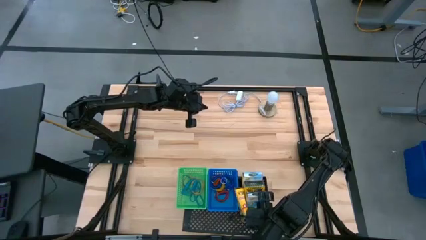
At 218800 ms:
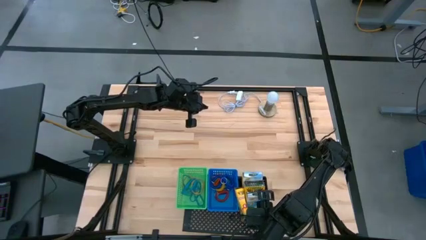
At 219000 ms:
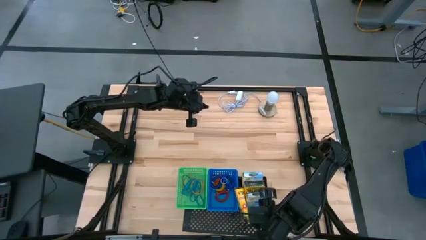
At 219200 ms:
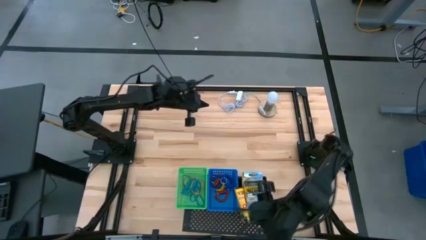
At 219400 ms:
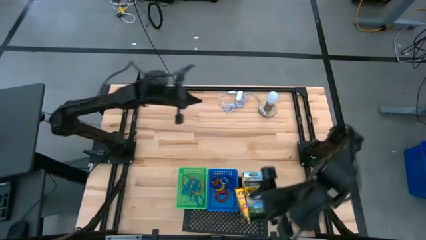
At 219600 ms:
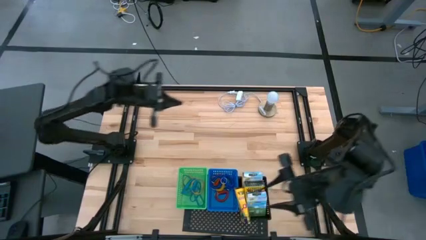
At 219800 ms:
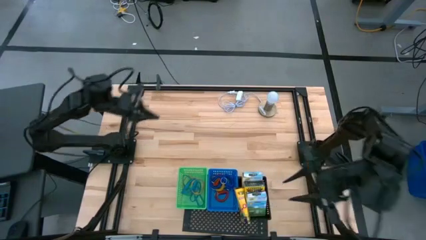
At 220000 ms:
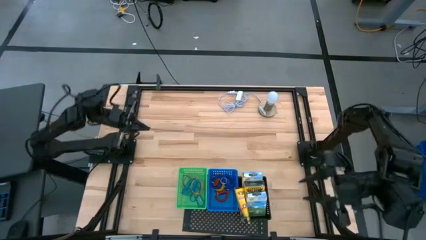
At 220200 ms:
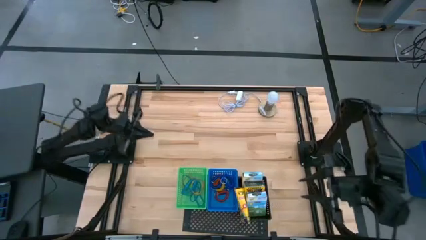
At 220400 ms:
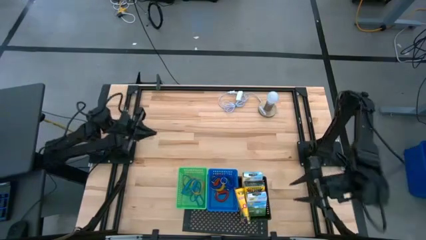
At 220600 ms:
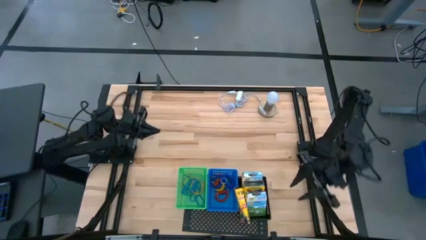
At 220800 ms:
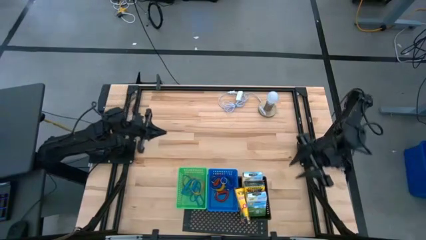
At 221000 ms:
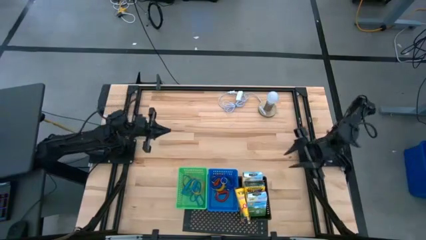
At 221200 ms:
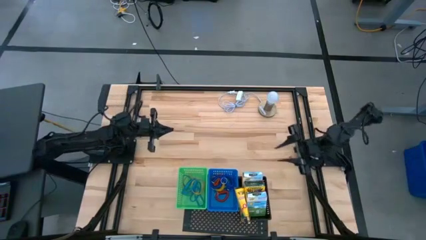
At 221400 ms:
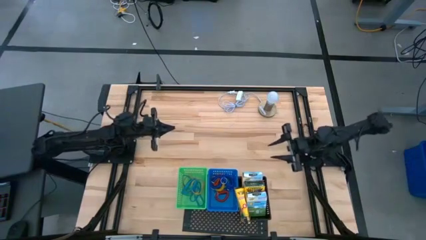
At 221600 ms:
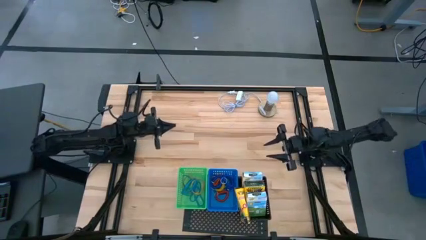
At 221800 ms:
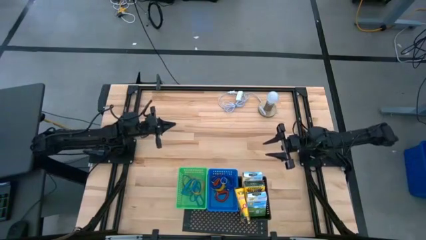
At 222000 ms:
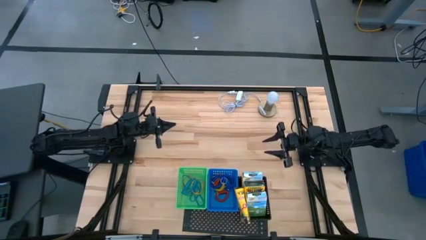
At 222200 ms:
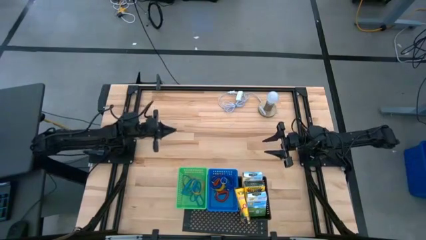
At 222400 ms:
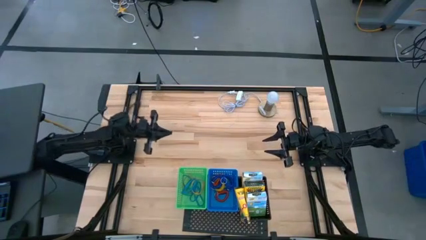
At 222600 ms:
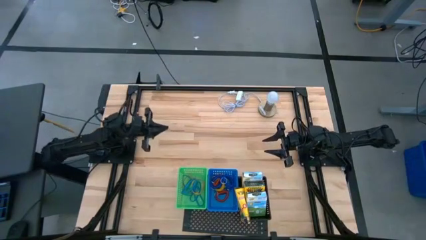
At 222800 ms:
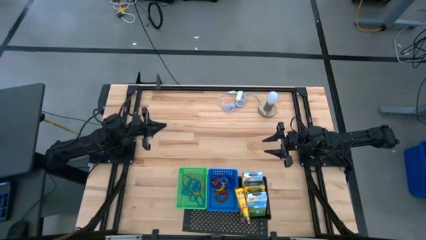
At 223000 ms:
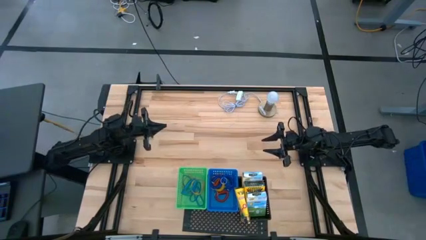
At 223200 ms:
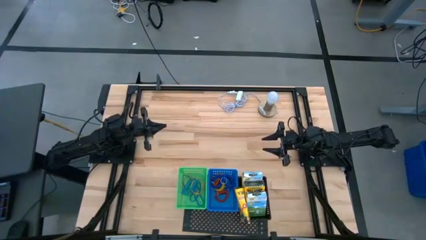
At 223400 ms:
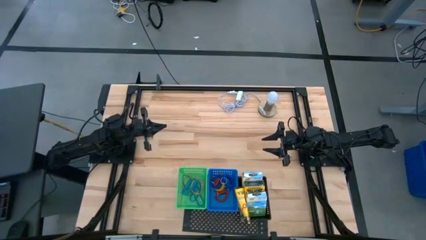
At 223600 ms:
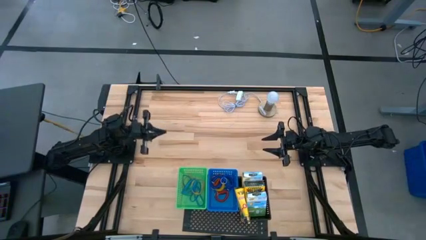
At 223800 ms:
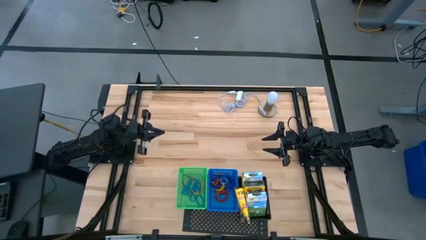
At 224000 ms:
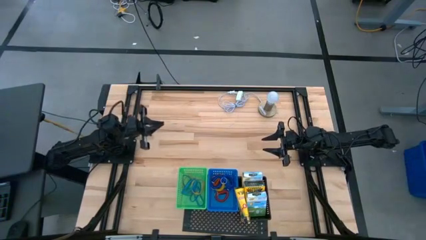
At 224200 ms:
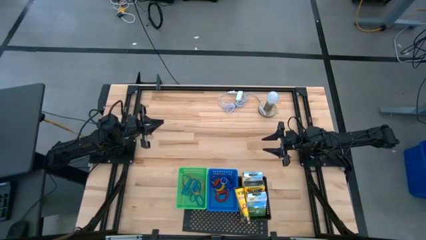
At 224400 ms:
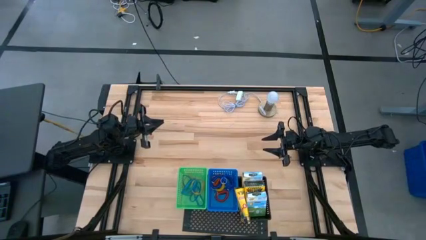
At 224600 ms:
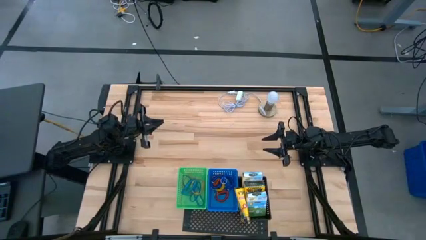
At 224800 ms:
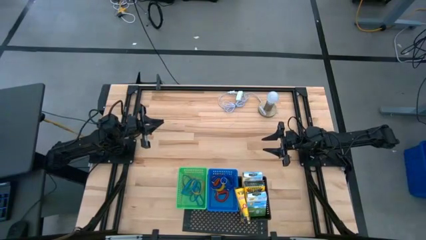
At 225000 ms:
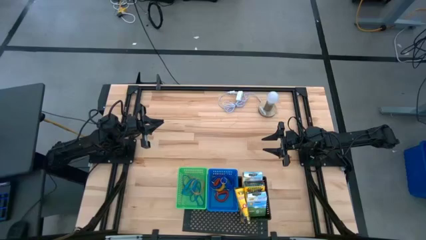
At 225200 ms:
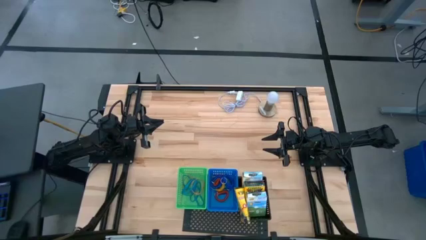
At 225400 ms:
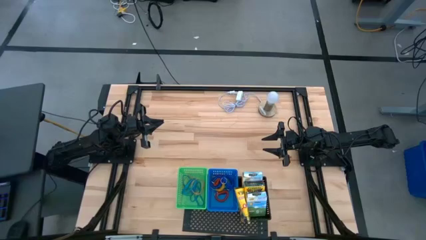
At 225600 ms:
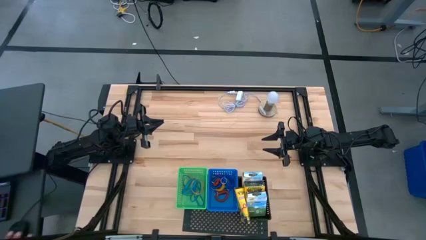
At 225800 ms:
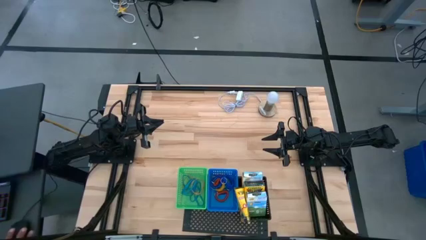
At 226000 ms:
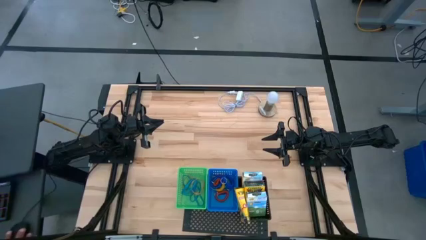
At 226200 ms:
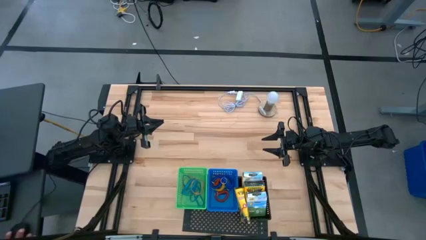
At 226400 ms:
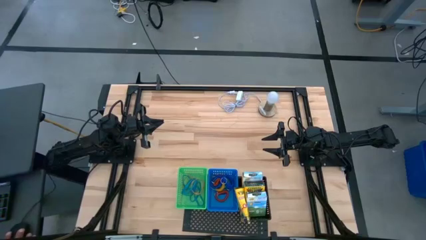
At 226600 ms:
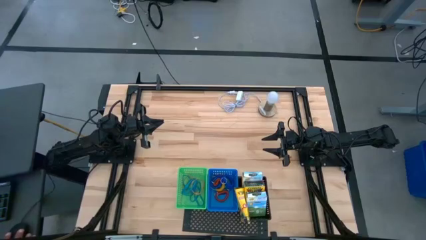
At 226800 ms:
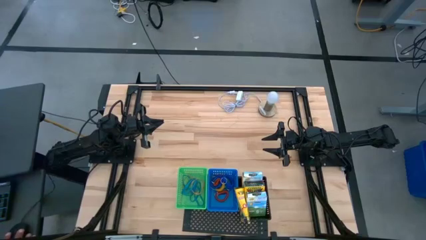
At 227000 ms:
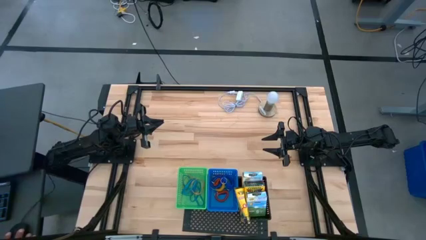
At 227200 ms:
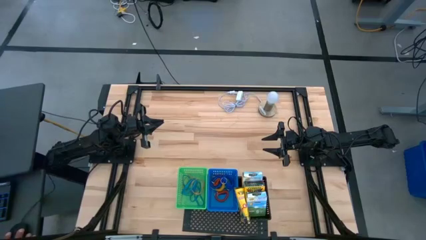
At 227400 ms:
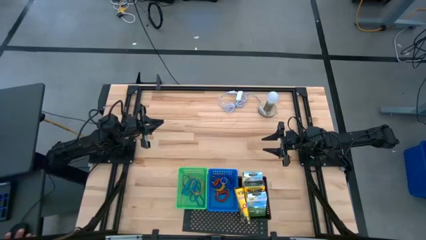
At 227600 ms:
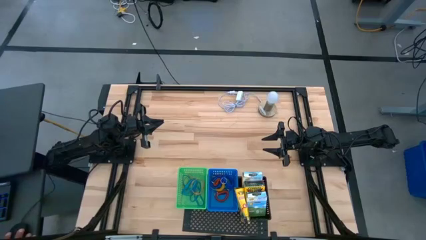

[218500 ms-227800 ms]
Task: Pick & Place Office Desk Supplies
Return to Home Position
